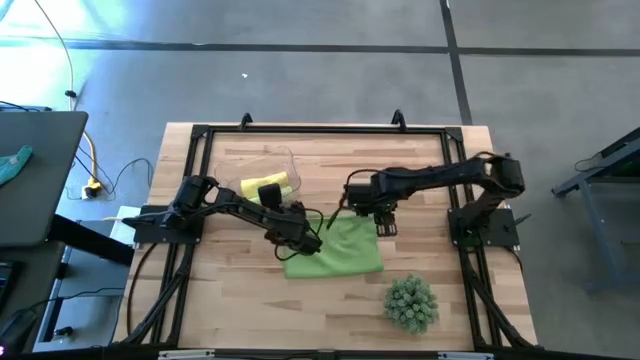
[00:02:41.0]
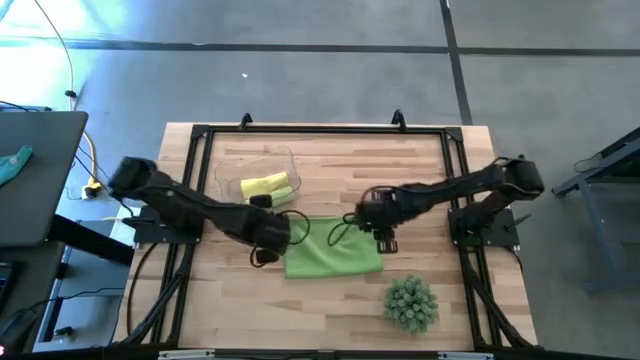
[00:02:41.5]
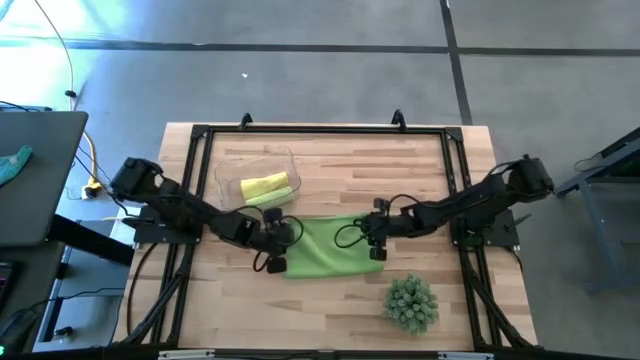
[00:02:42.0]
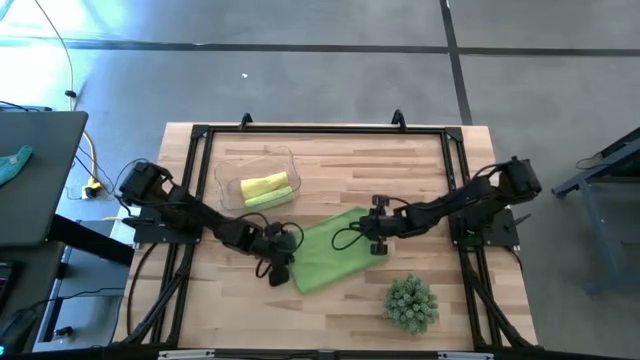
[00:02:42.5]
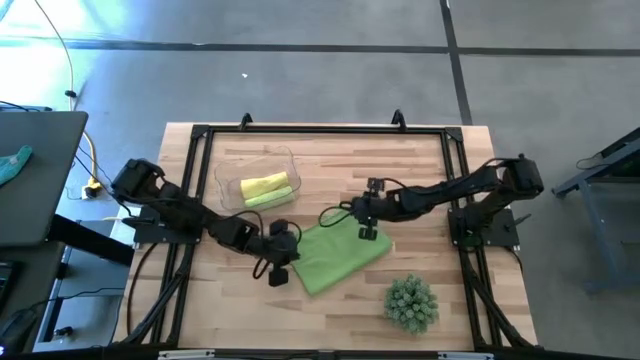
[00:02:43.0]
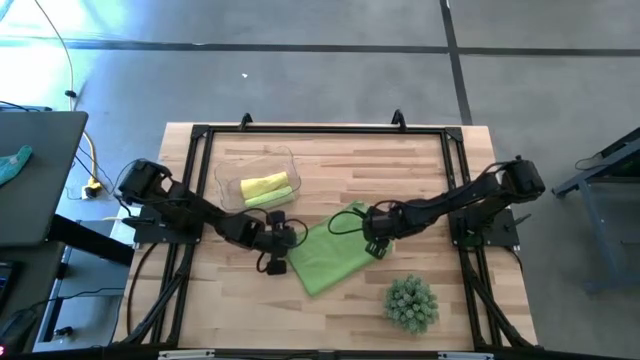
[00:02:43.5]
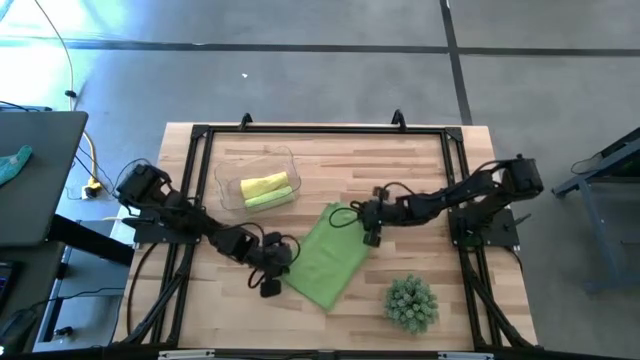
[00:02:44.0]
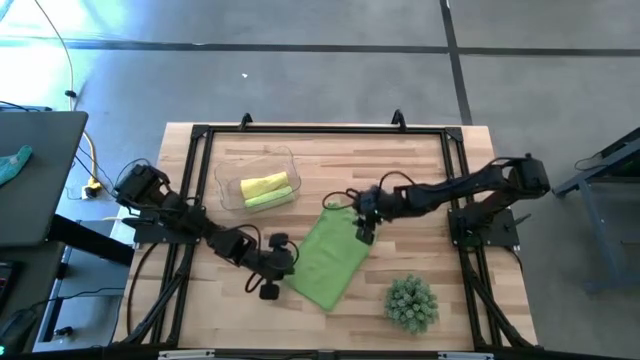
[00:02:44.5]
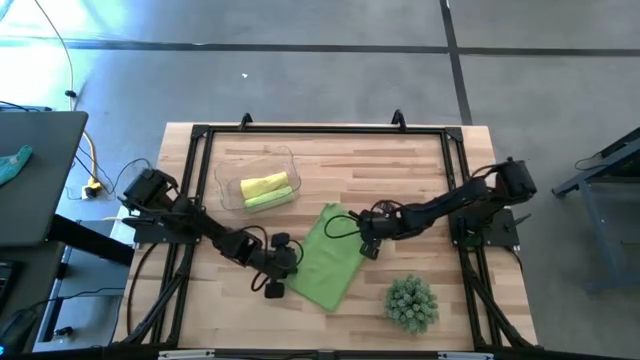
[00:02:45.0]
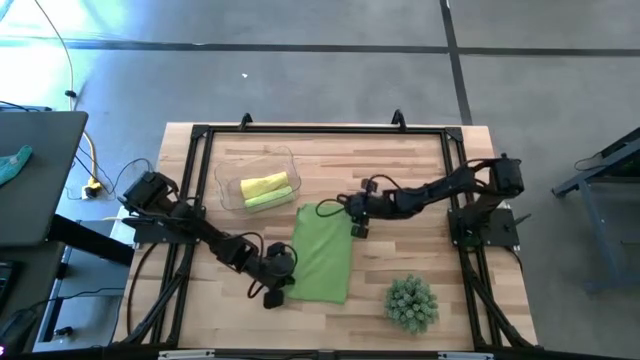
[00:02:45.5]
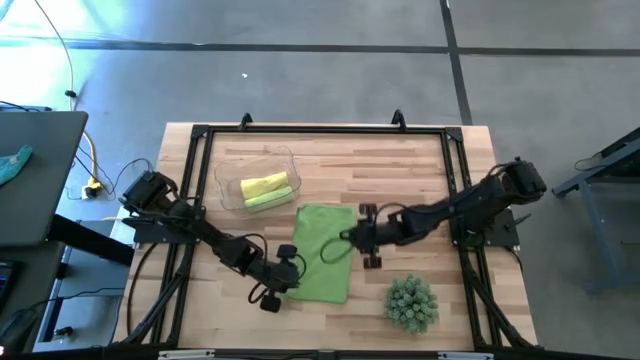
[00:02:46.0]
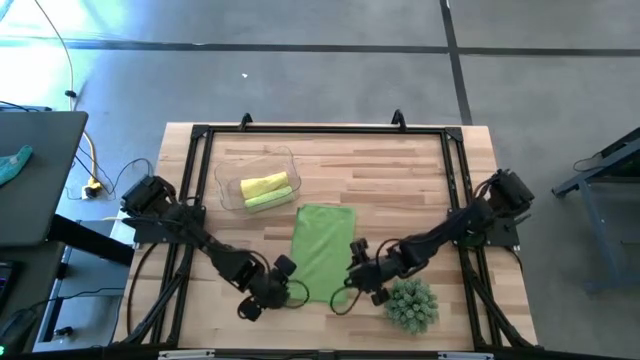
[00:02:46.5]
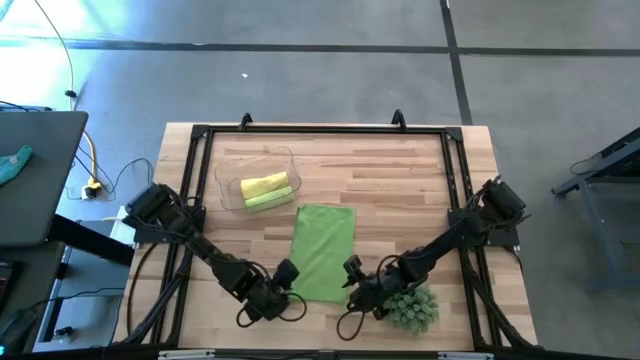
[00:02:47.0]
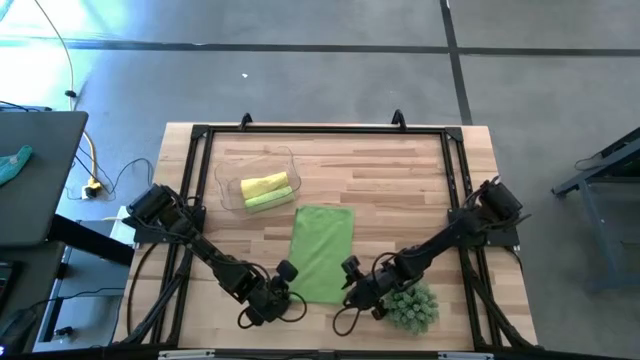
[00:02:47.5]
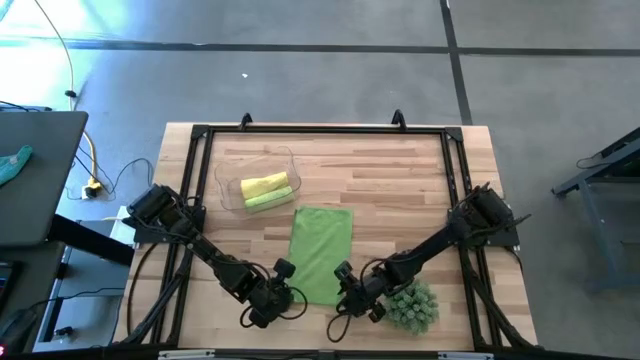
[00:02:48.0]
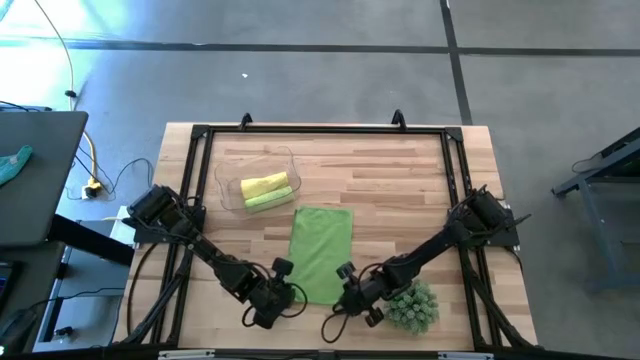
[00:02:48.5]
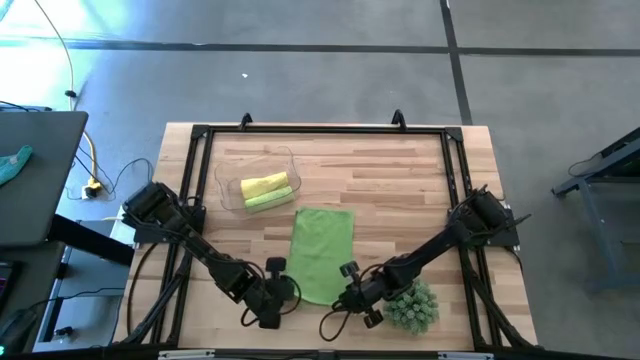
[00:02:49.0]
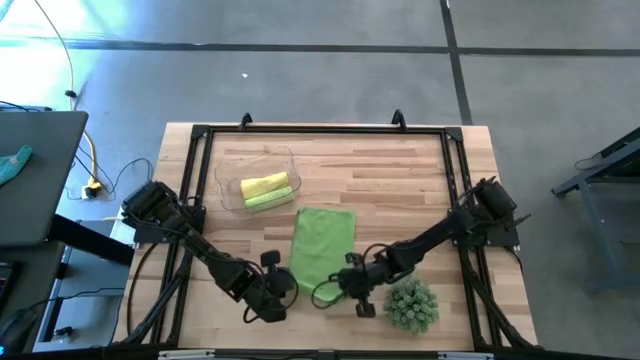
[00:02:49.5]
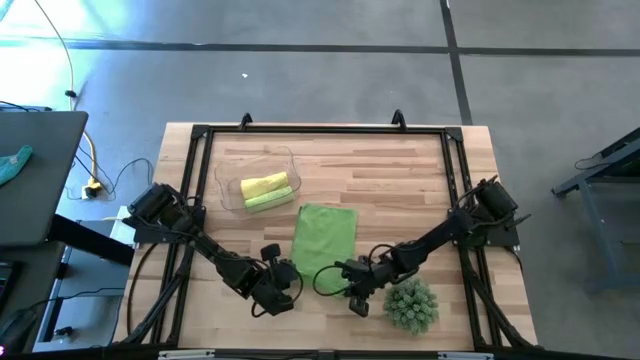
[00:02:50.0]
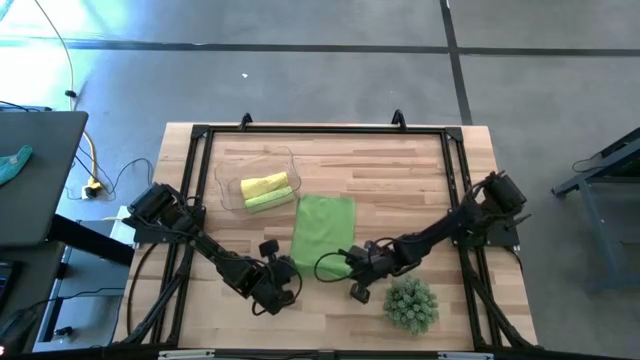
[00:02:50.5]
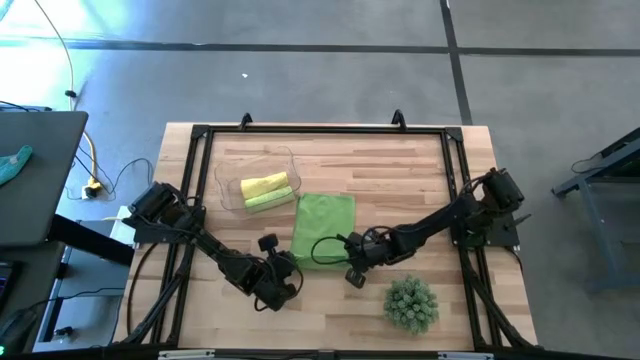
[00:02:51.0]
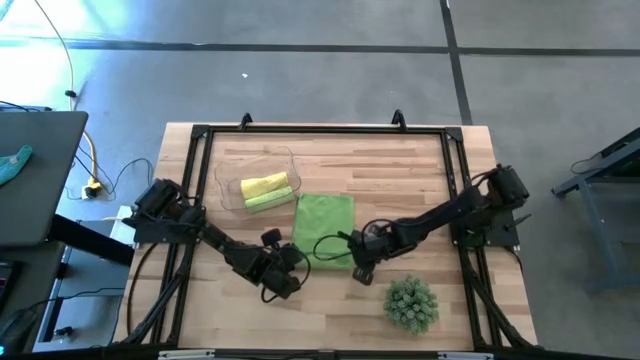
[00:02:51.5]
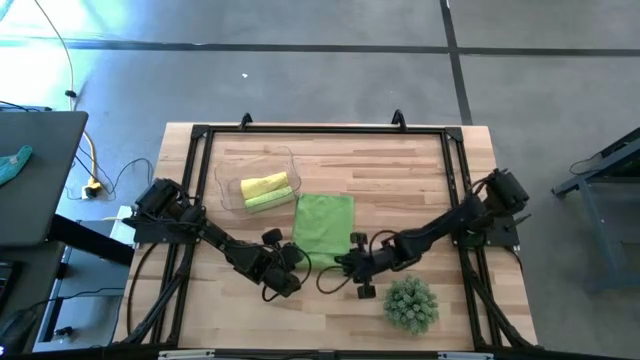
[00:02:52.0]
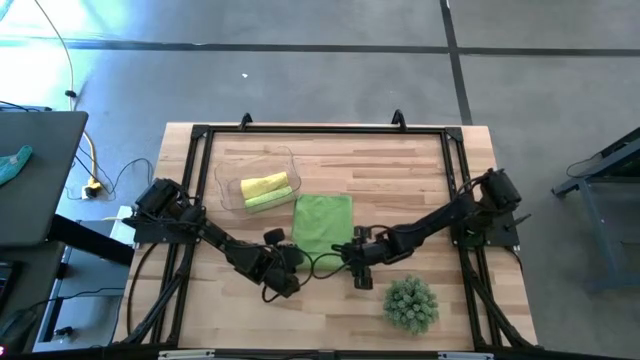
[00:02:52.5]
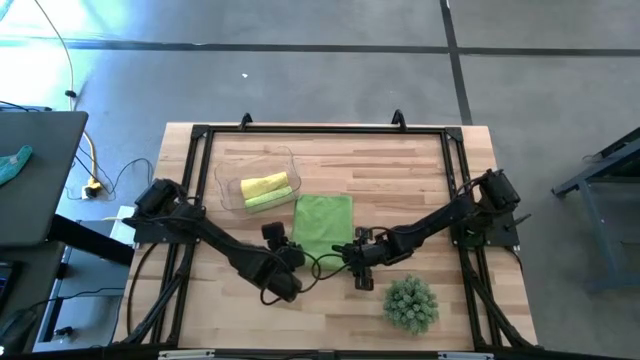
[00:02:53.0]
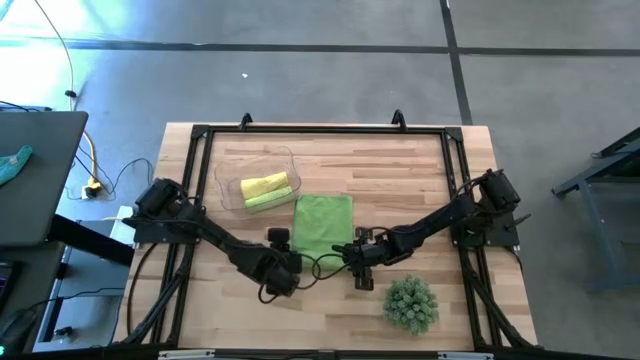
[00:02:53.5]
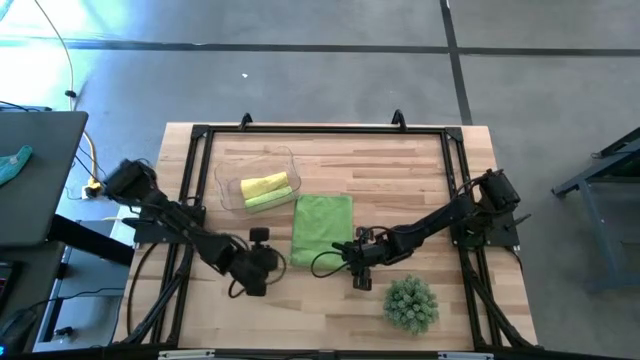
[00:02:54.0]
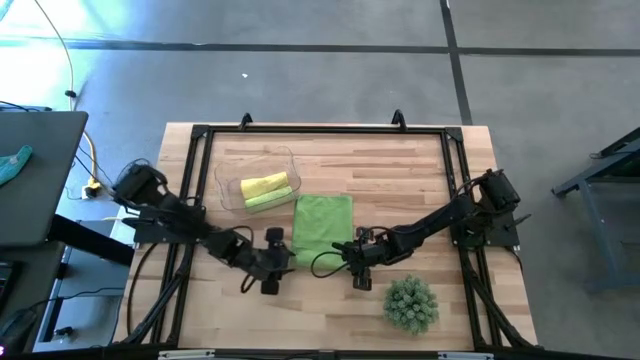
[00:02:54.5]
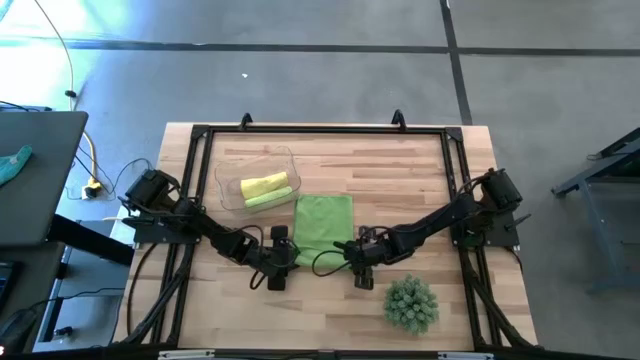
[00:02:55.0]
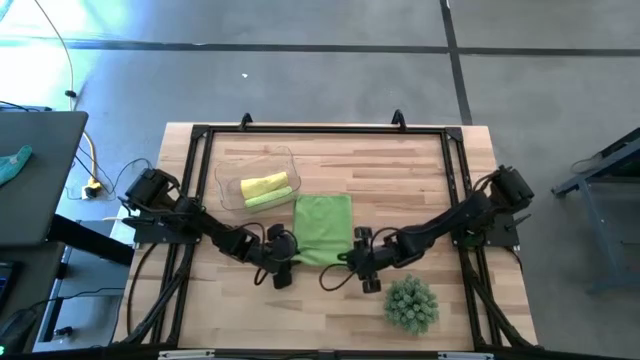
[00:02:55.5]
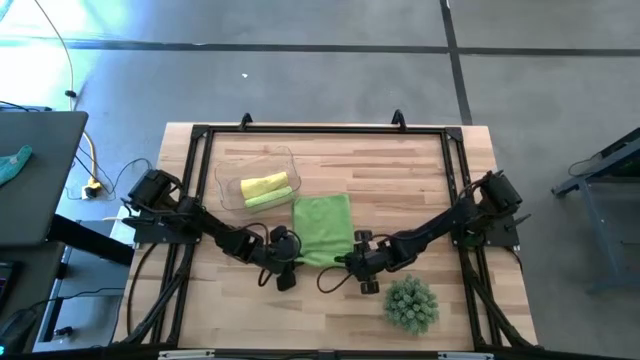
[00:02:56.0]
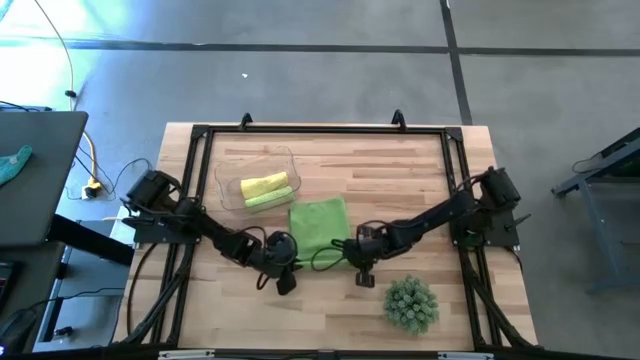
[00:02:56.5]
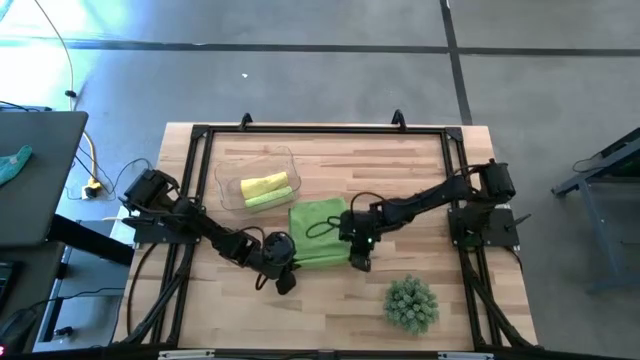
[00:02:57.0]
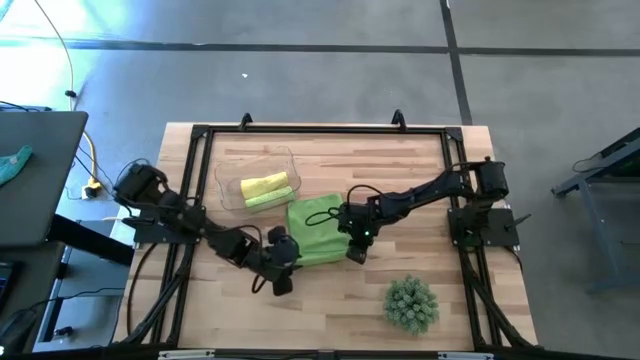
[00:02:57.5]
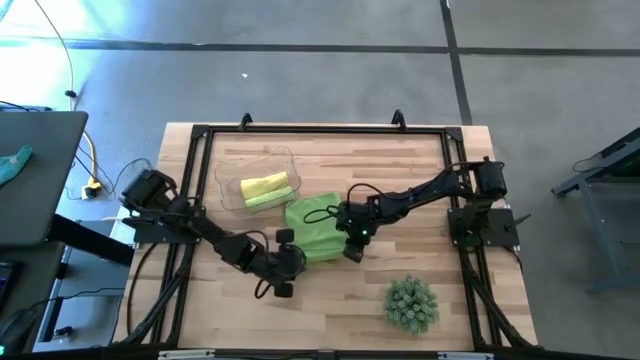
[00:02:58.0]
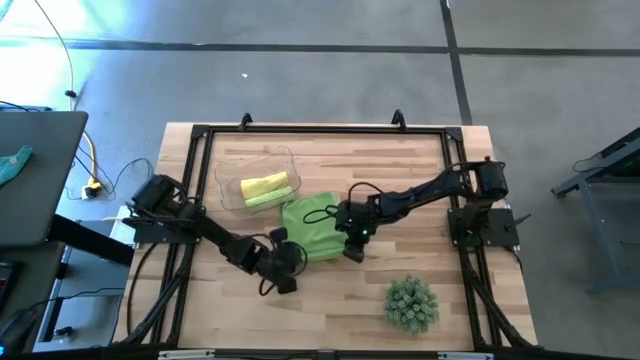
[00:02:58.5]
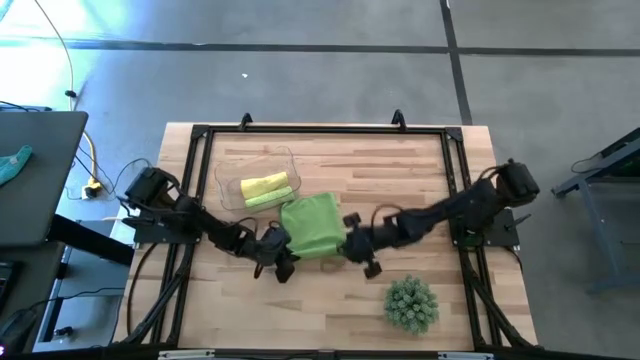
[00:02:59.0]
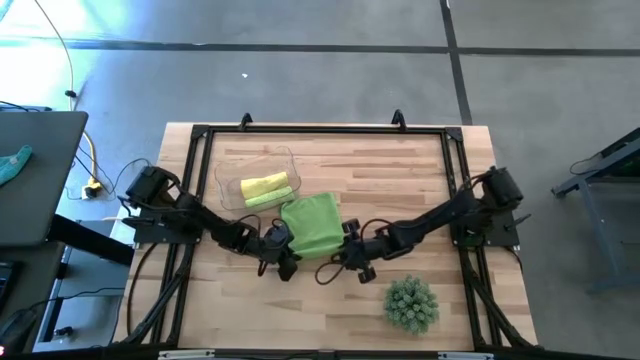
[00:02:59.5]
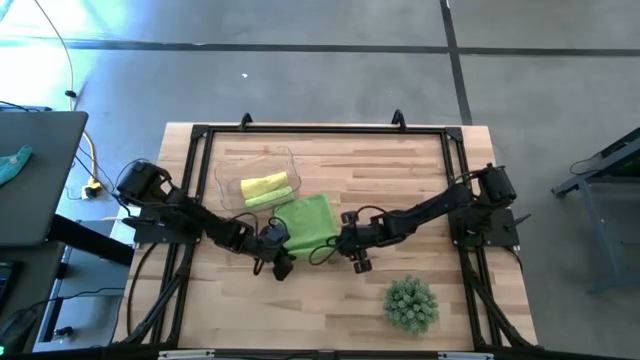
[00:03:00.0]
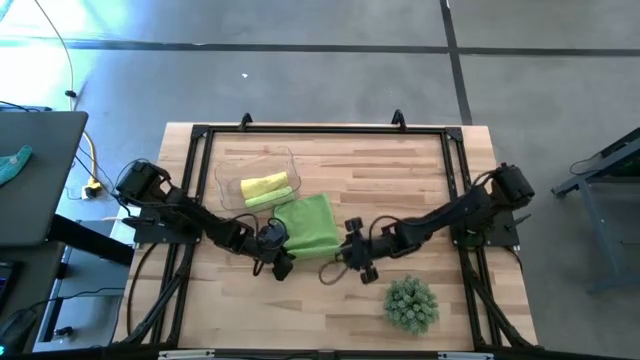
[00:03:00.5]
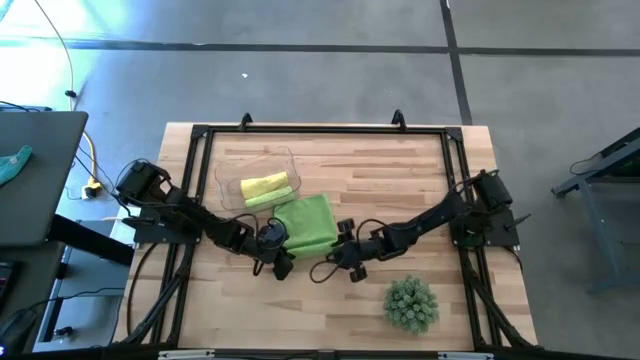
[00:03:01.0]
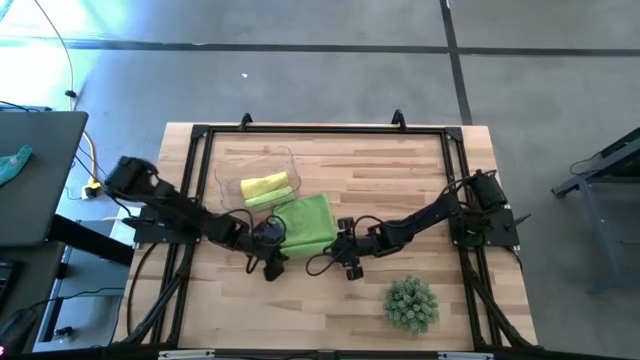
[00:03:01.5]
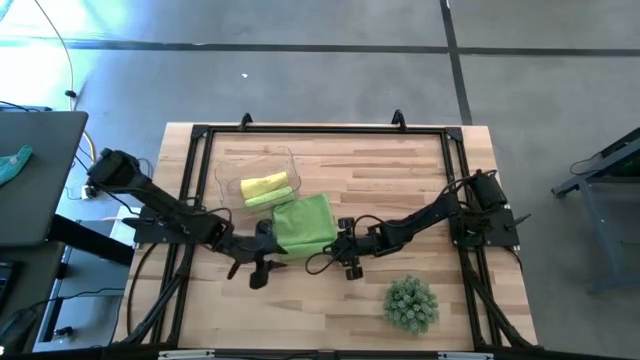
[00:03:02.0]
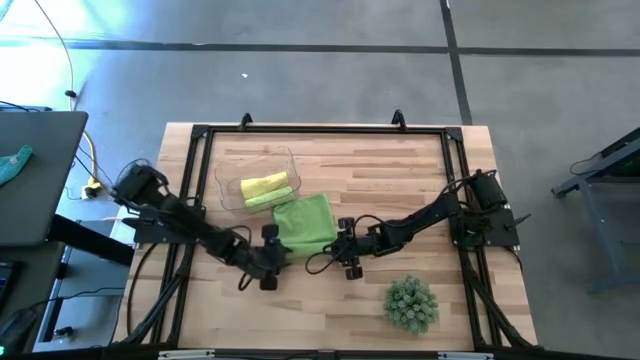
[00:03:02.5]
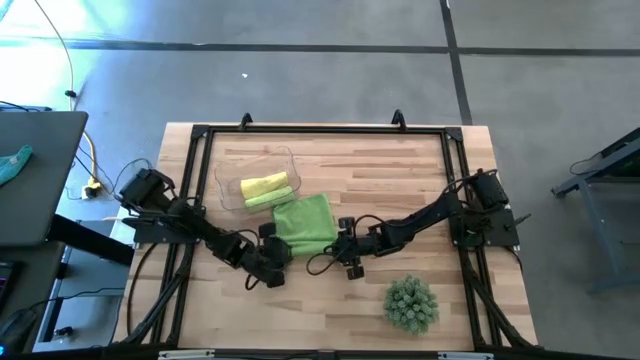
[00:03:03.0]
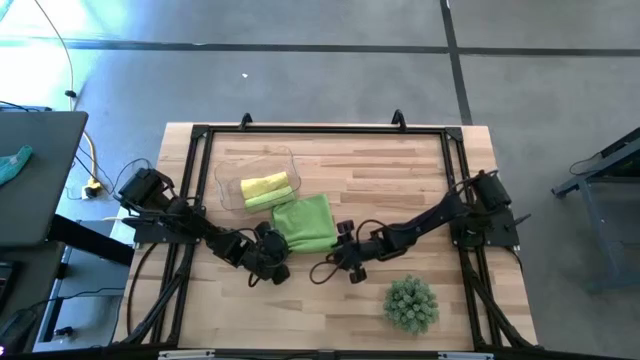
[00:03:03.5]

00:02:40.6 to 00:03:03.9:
Task: Roll microfiber towels into tight, uniform cylinder then place into a basket
Roll the green towel
